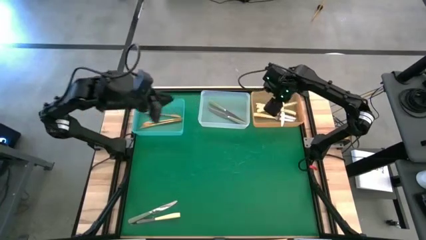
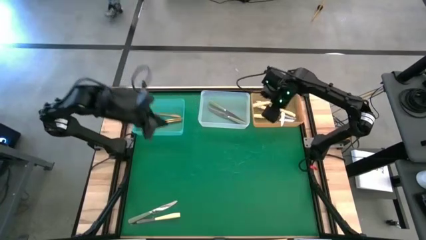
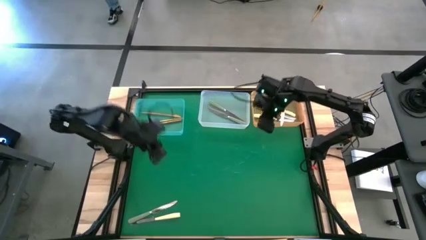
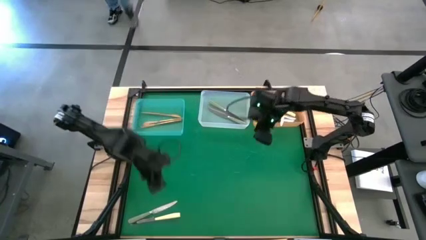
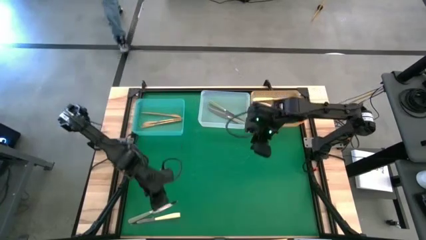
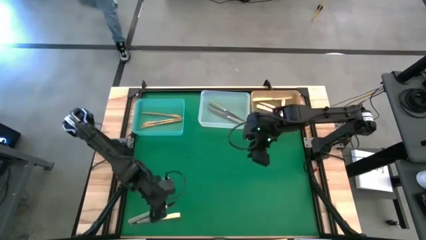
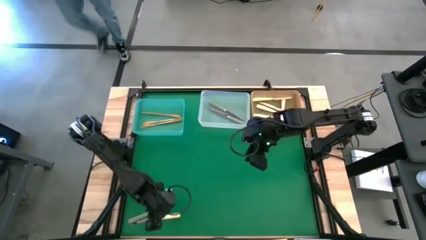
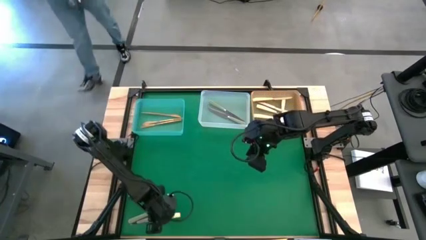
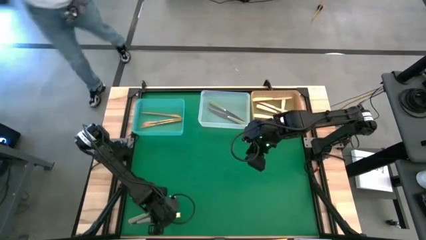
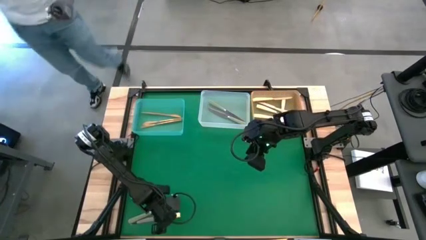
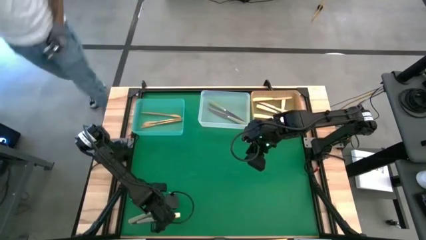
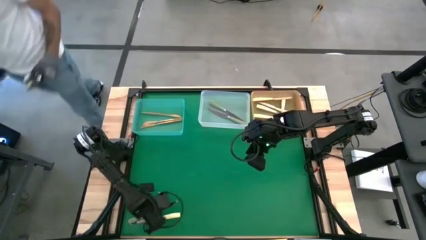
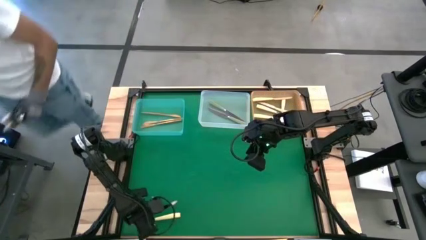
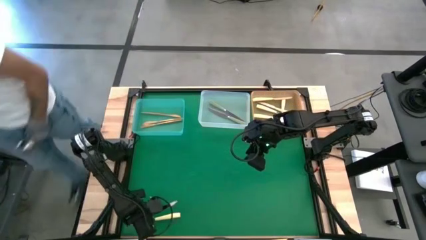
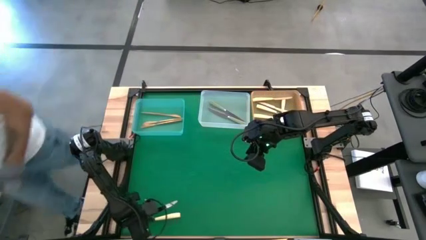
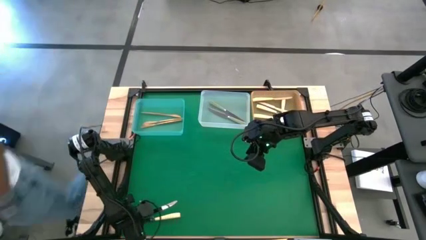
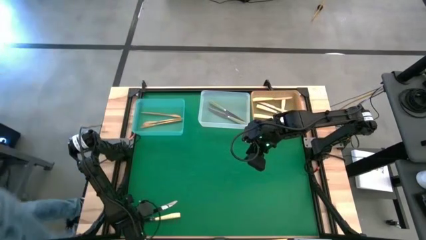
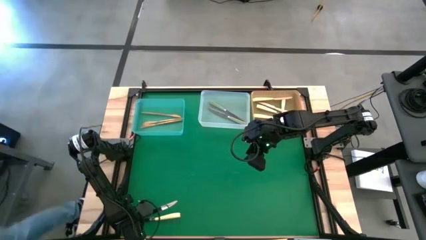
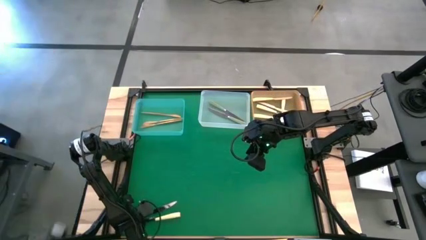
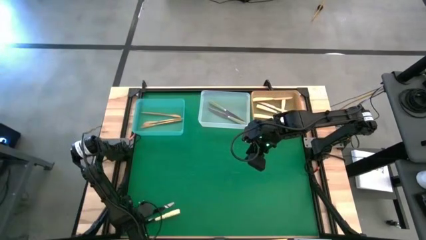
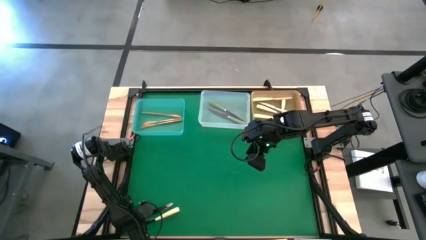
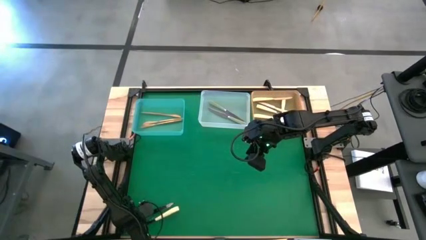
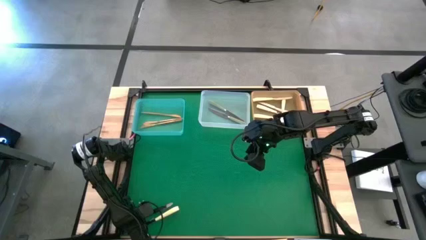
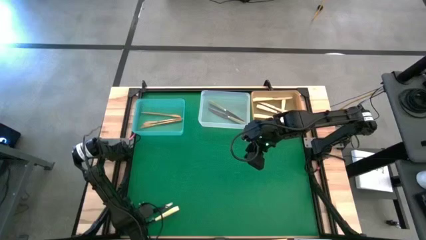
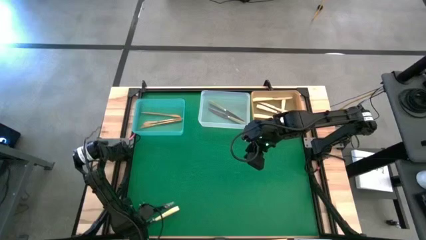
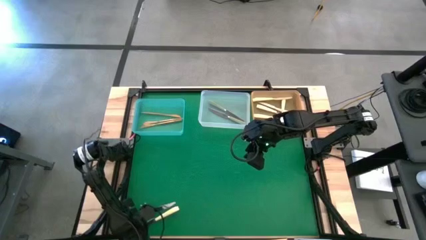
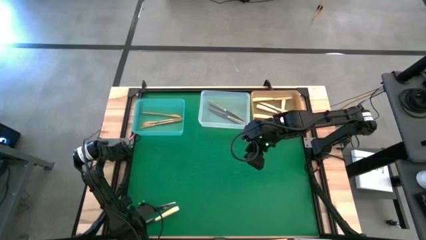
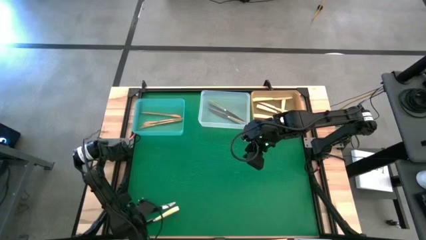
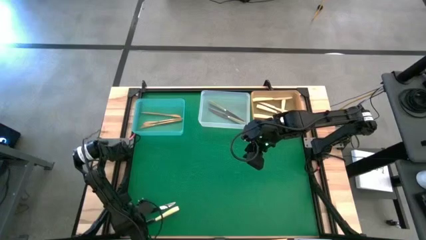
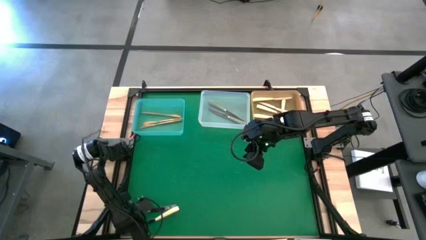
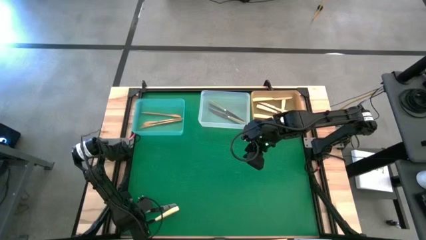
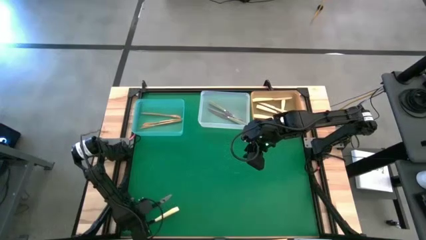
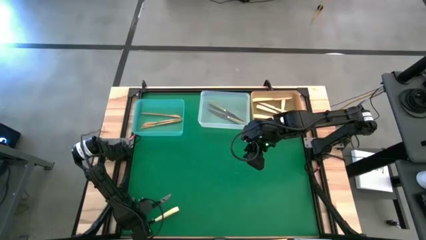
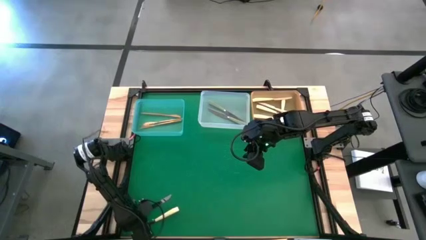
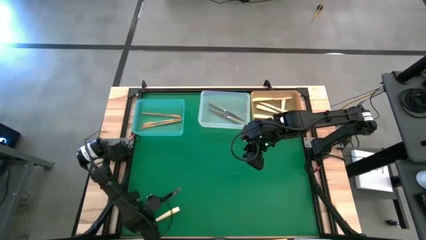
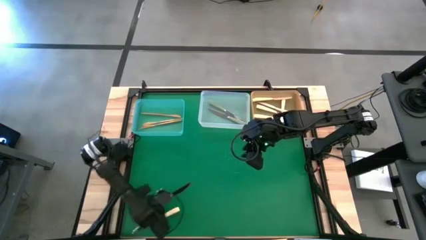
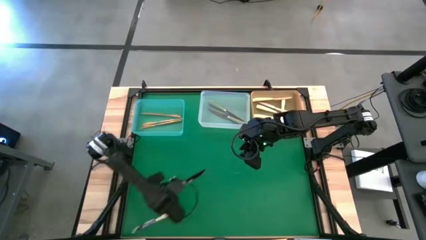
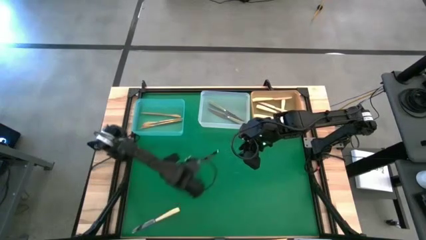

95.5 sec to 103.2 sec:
Task: Sort silverware by color (type)
Put the green knife into the transparent bin

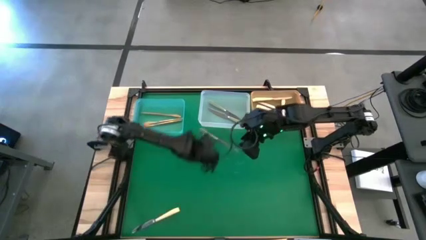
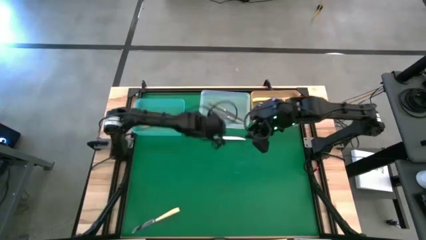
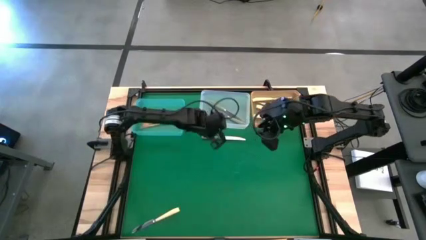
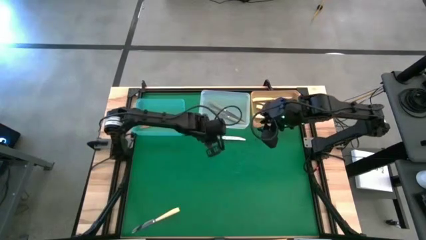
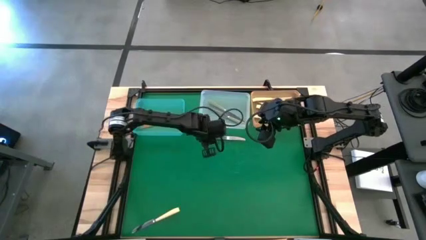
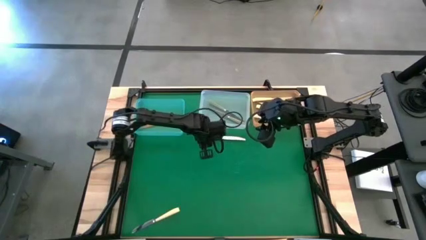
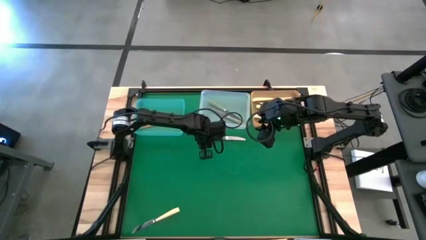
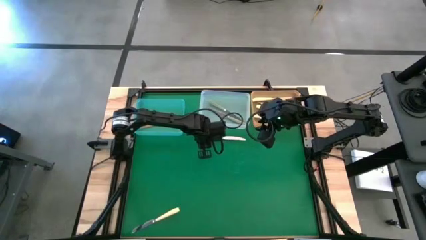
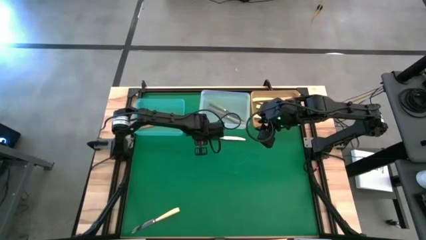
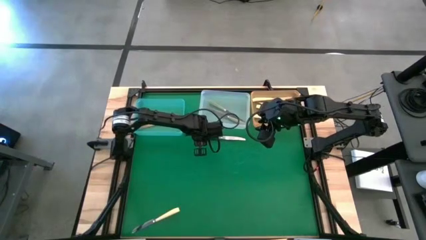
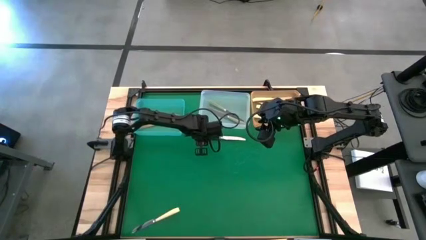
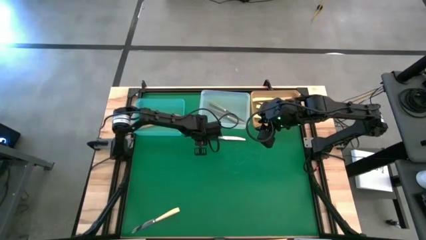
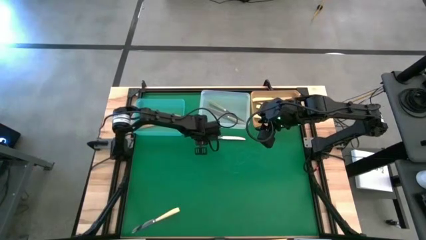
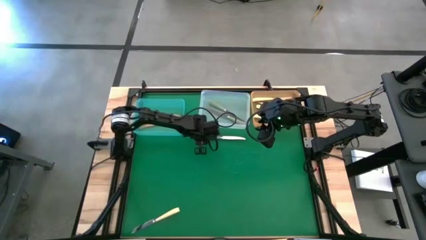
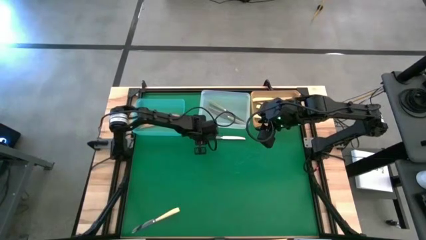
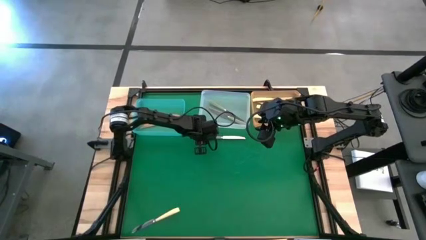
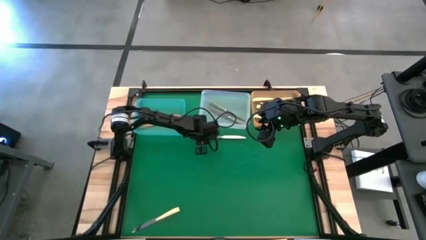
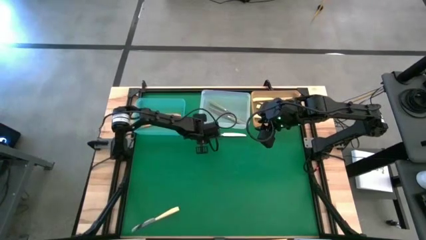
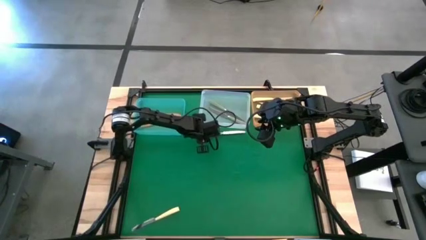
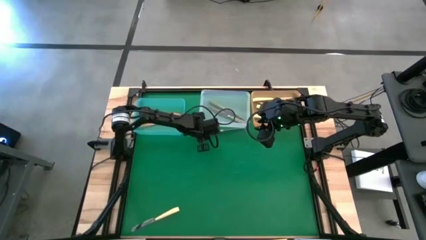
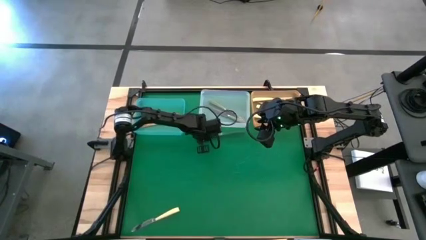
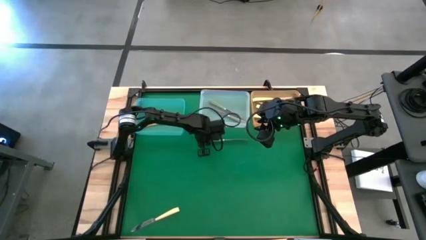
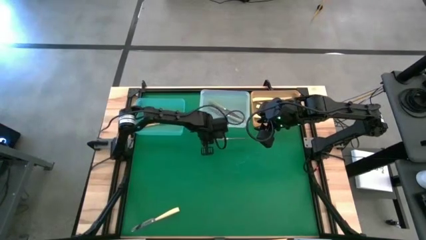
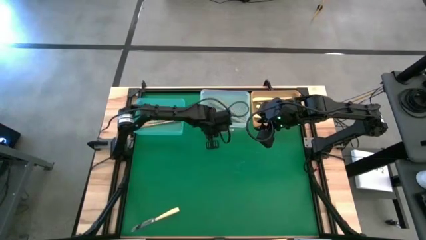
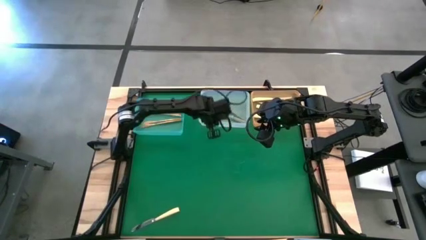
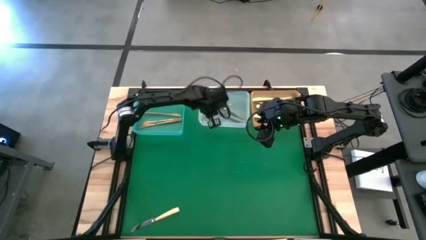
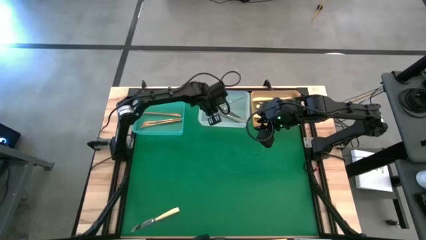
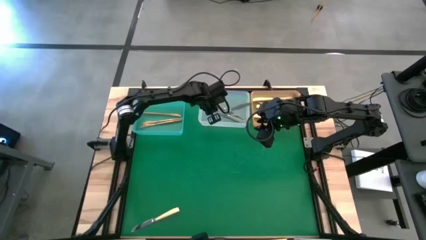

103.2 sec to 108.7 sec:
Put the green knife into the transparent bin

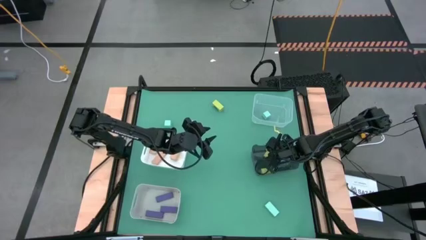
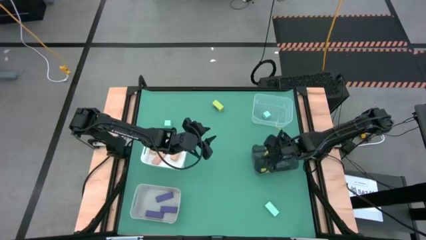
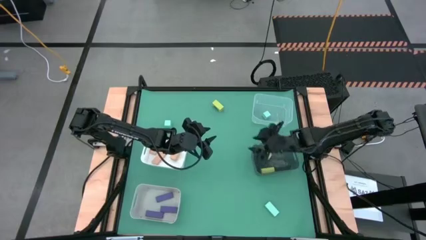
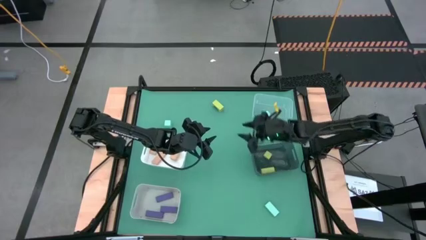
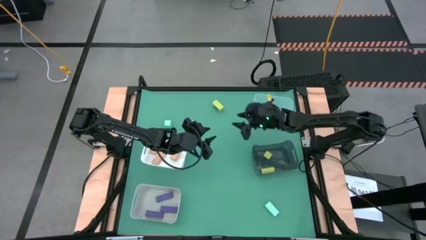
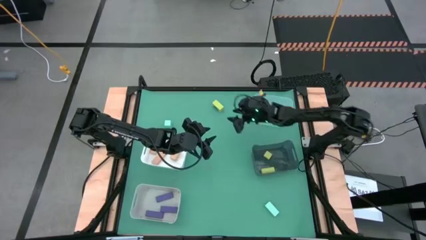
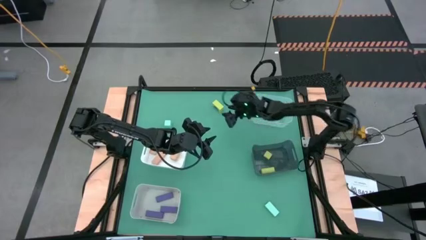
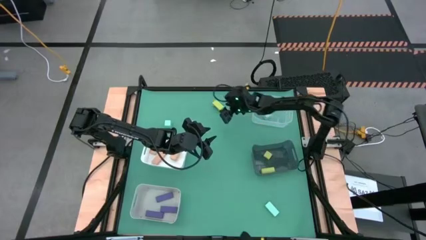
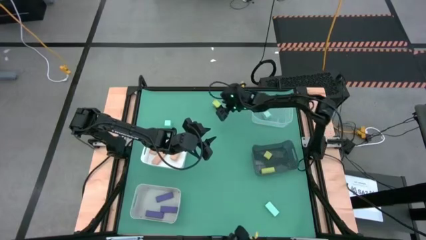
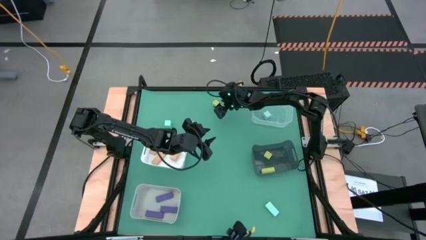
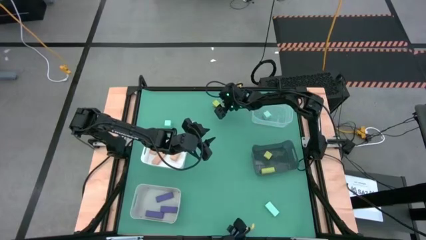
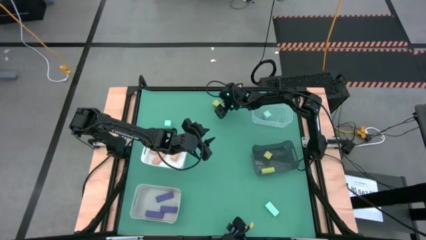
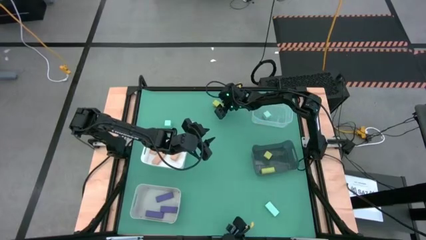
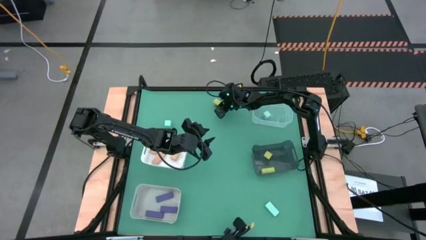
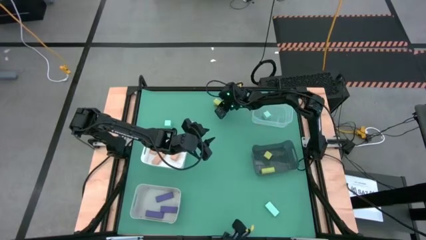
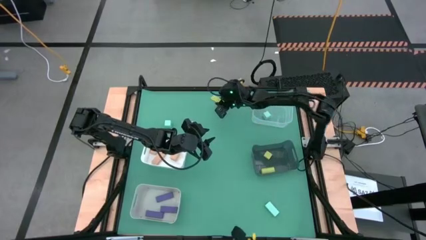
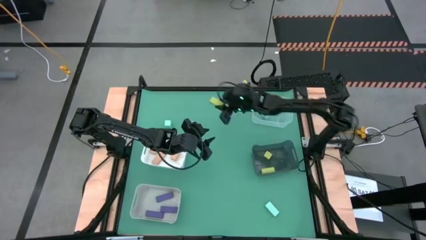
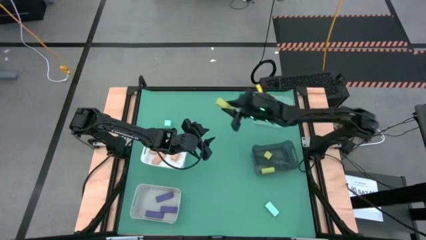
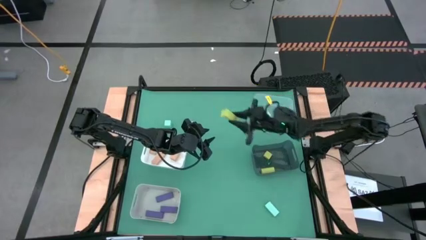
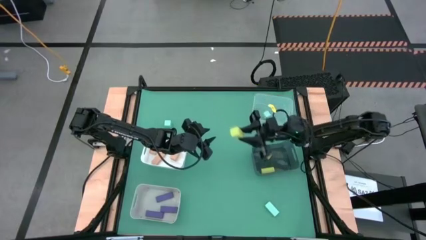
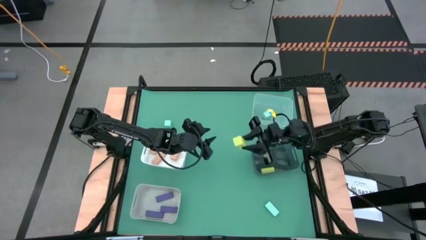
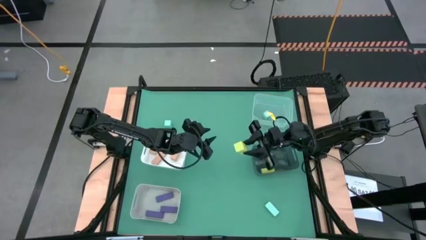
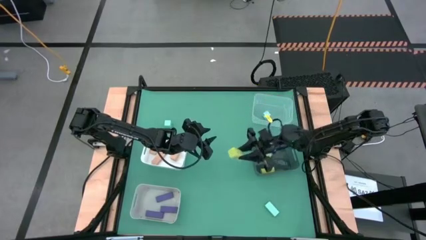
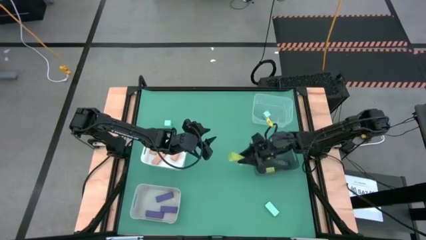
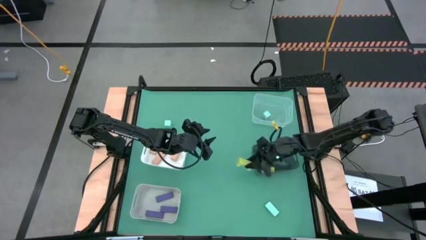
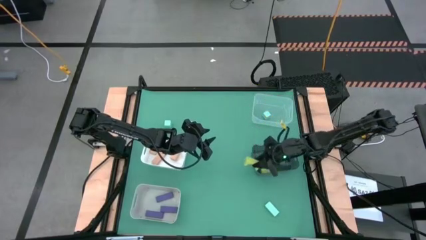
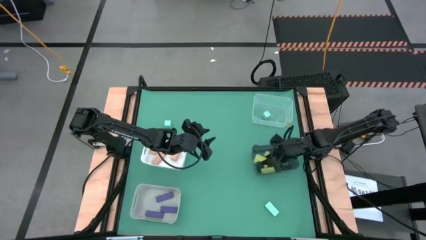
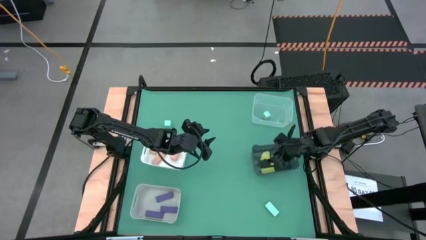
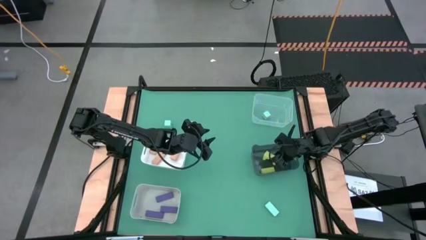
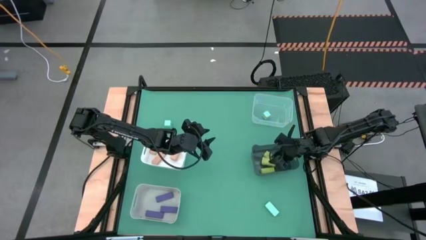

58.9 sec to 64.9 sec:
Task: Sort & place blocks by color
Put the green block into the black bin
